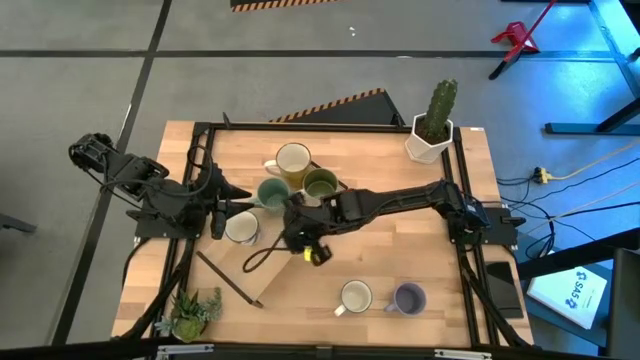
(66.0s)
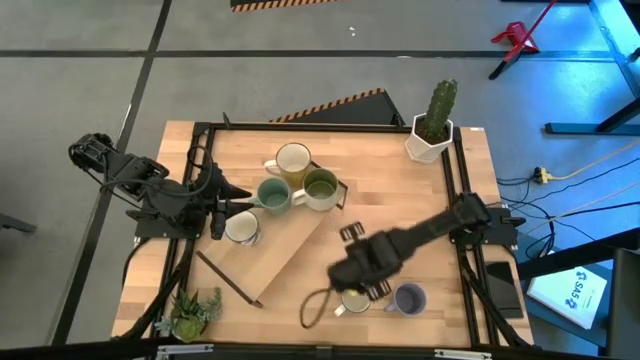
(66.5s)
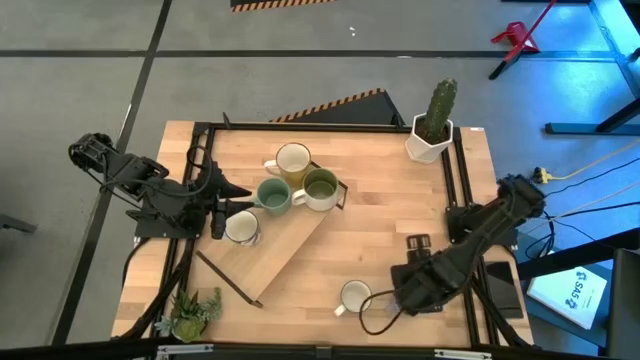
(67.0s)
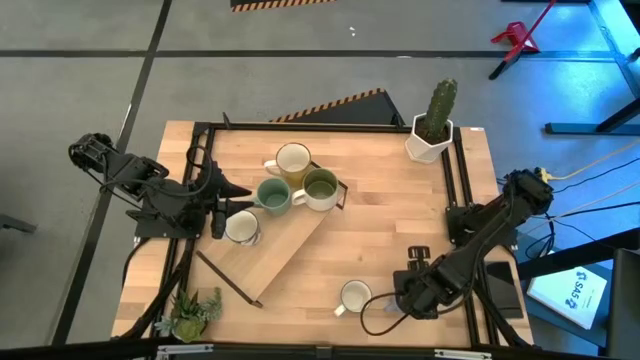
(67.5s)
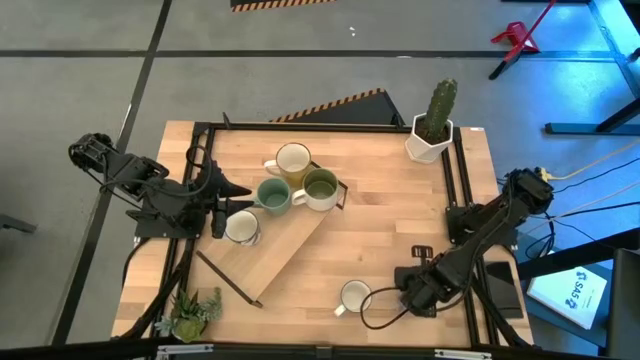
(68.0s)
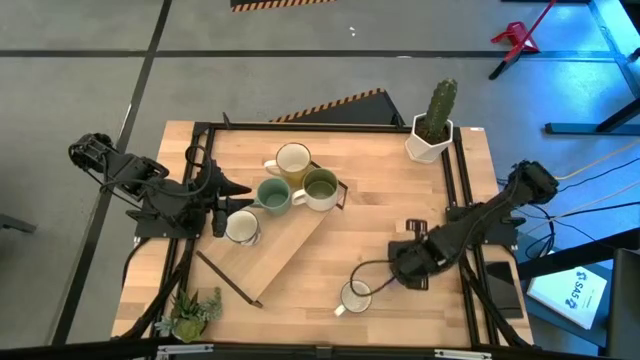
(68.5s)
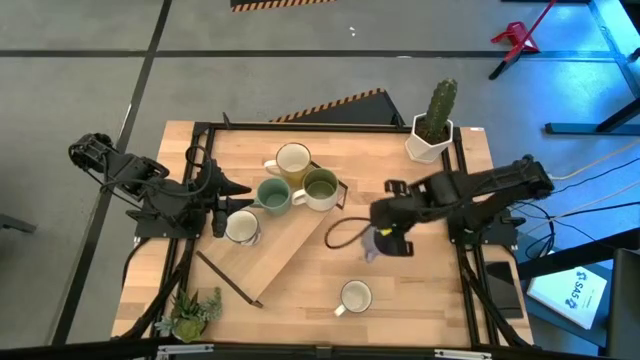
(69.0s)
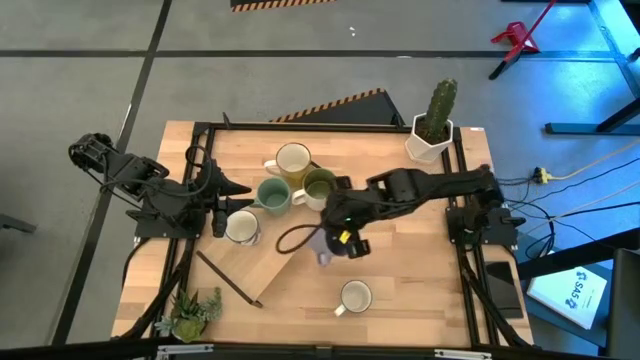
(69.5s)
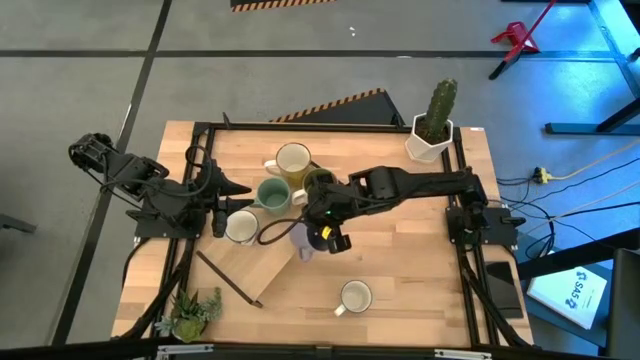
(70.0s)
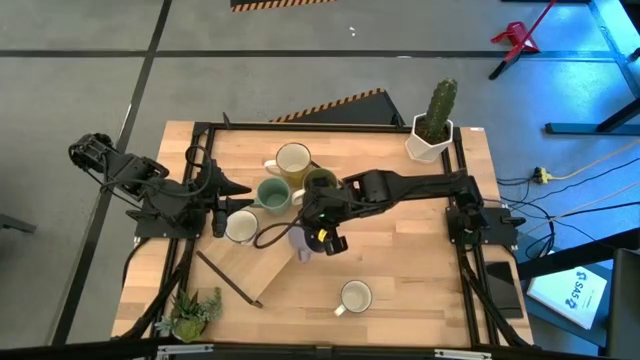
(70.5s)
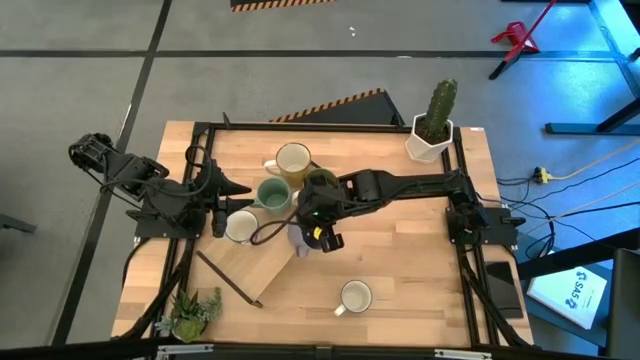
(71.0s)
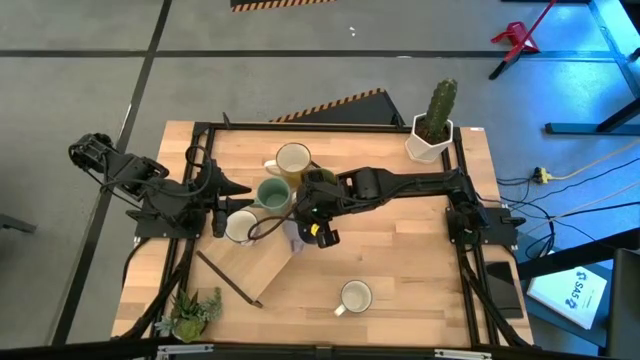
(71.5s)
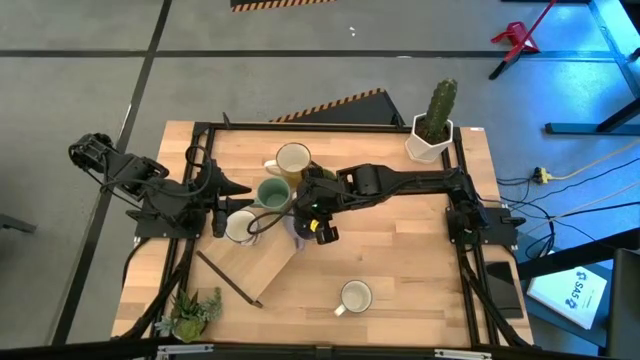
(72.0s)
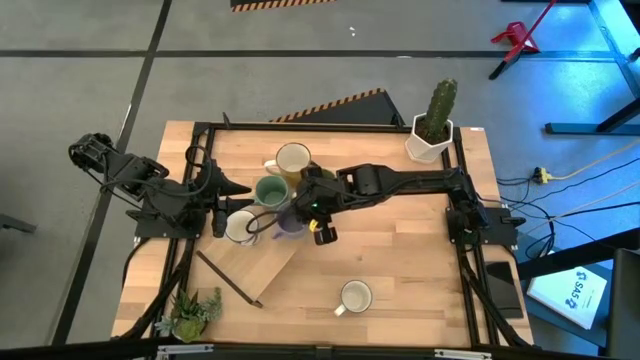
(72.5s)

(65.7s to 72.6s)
Task: Place coffee mugs
Put the purple mug on the shelf

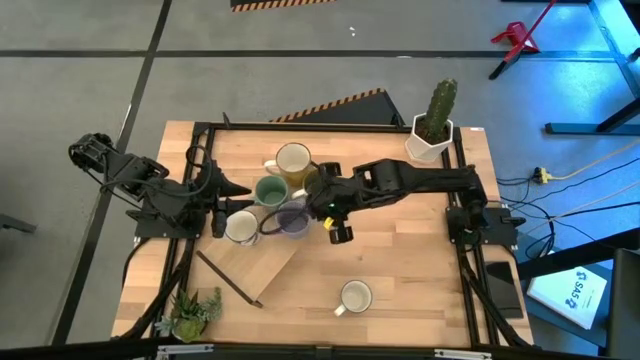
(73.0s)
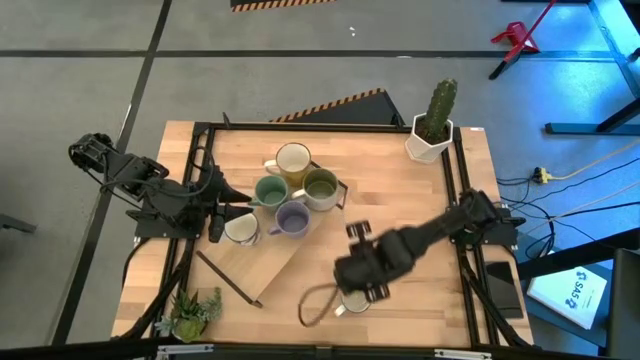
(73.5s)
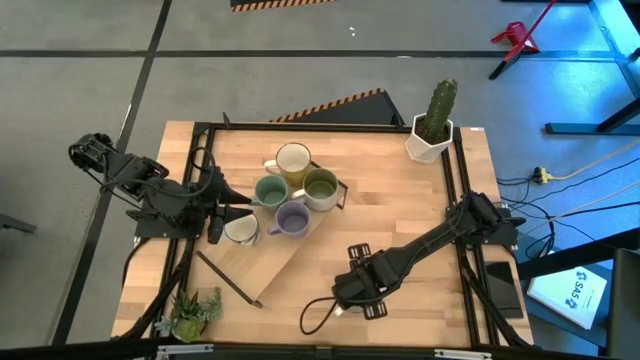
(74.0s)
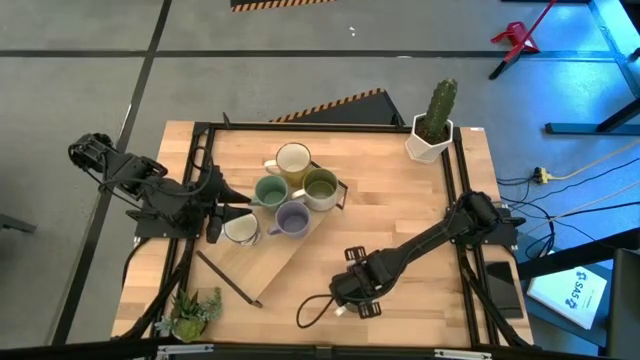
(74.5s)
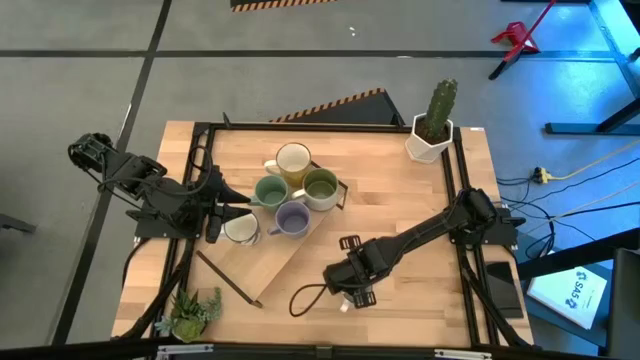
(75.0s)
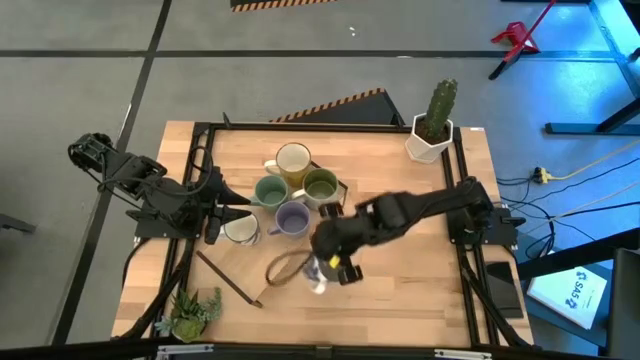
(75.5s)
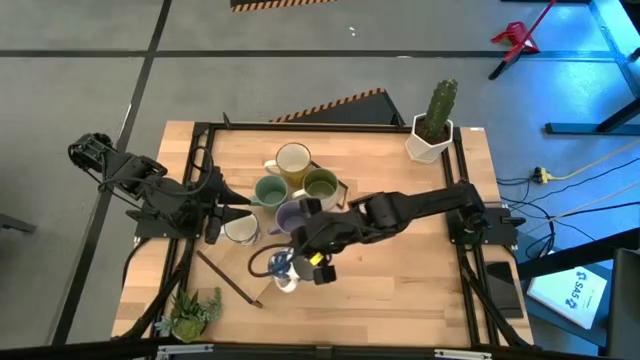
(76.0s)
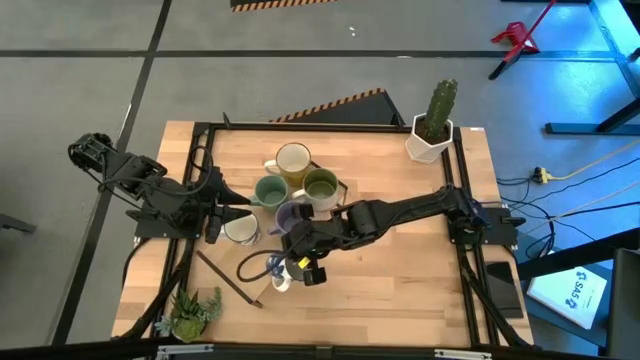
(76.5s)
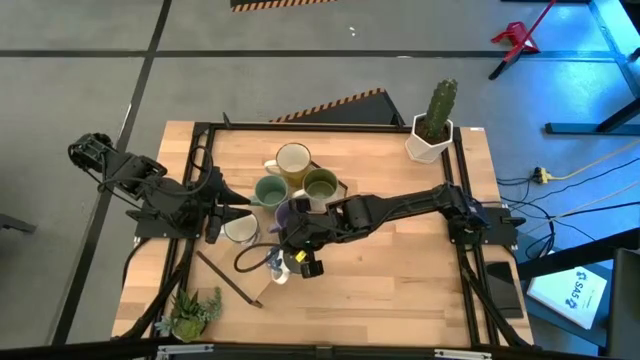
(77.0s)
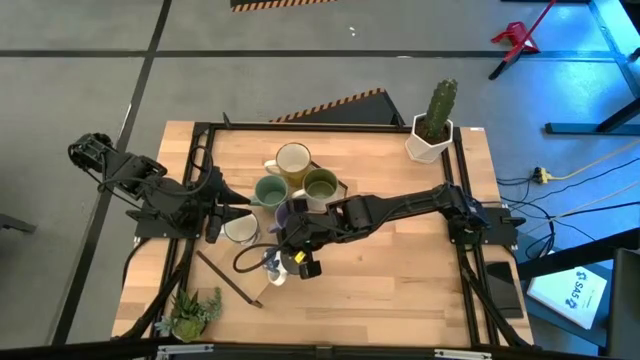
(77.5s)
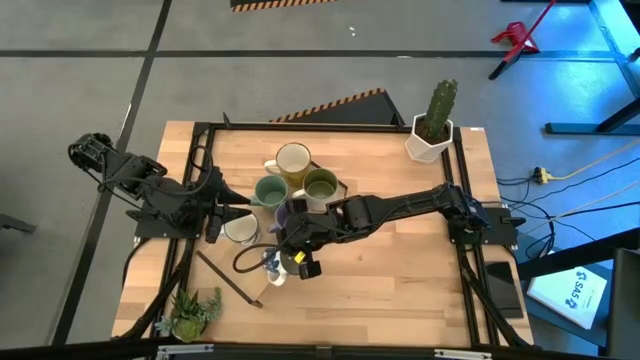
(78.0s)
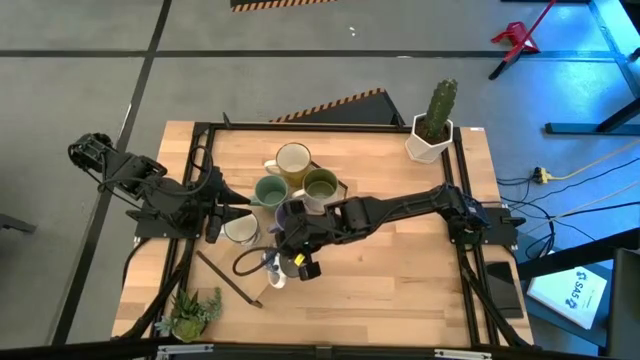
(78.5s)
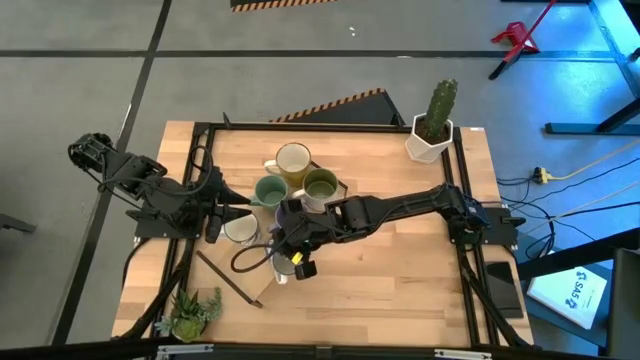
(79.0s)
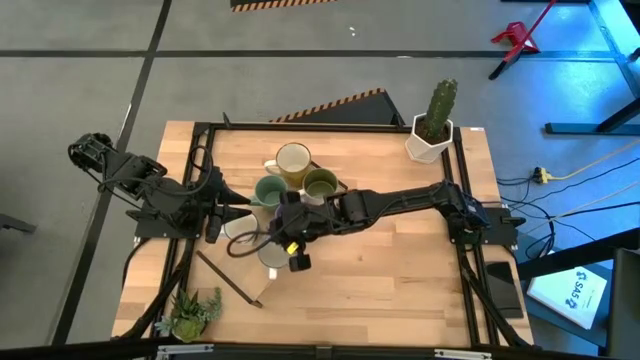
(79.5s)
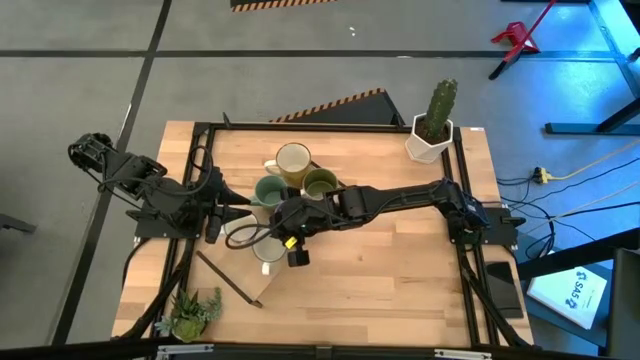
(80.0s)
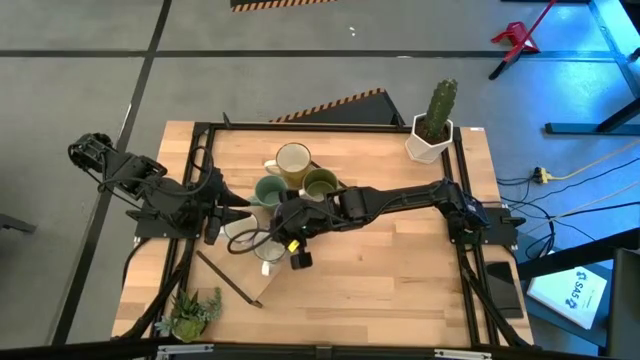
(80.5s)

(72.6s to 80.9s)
Put the flowered mug on the shelf

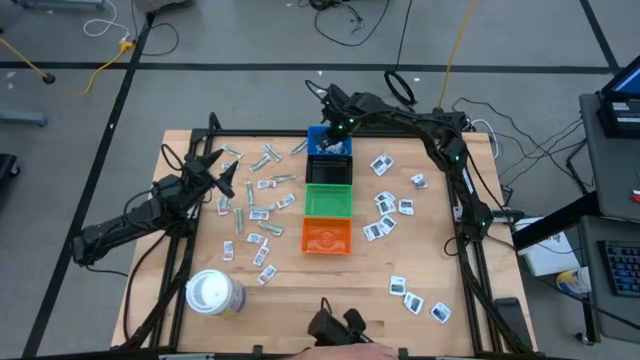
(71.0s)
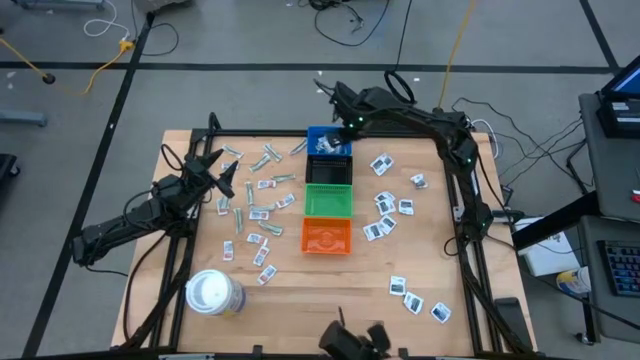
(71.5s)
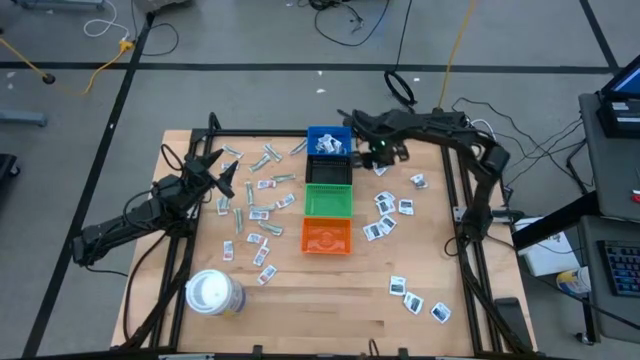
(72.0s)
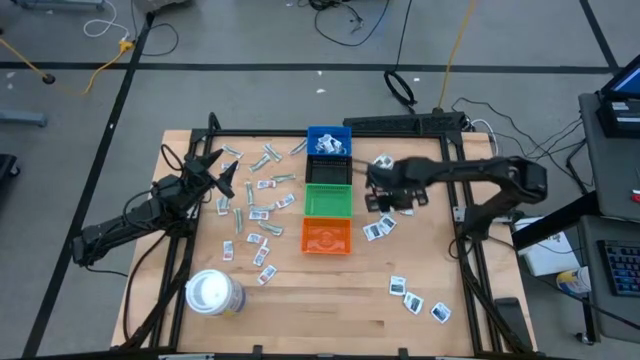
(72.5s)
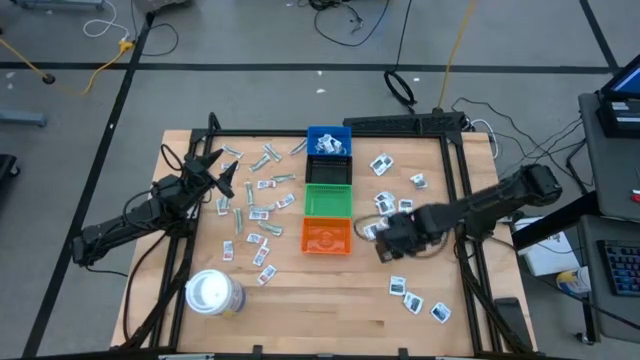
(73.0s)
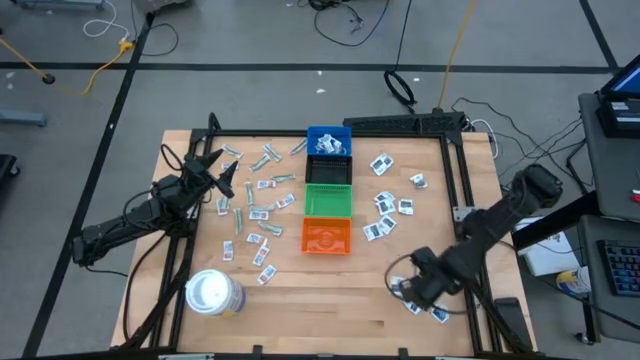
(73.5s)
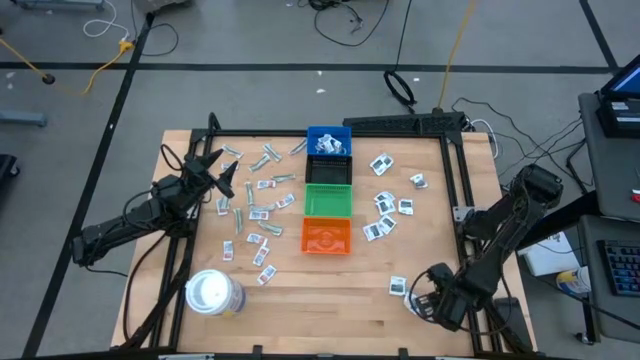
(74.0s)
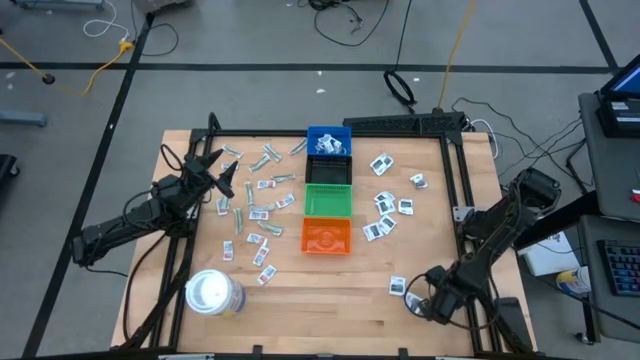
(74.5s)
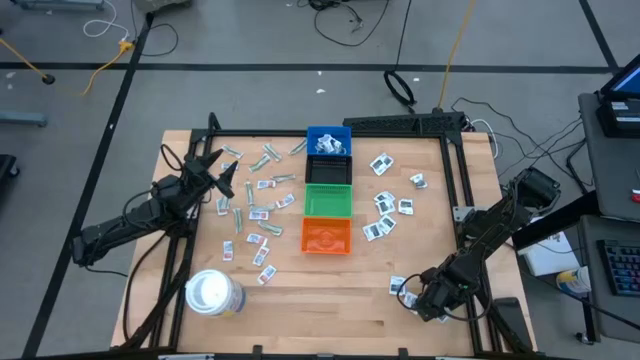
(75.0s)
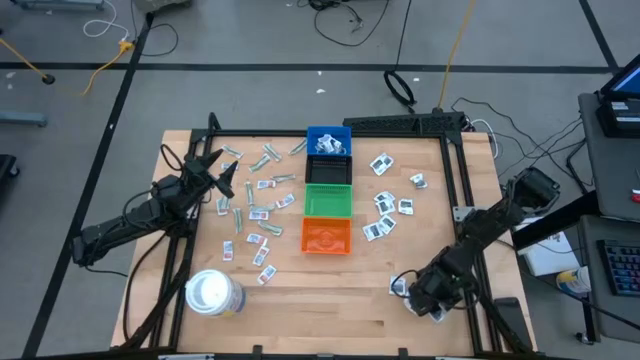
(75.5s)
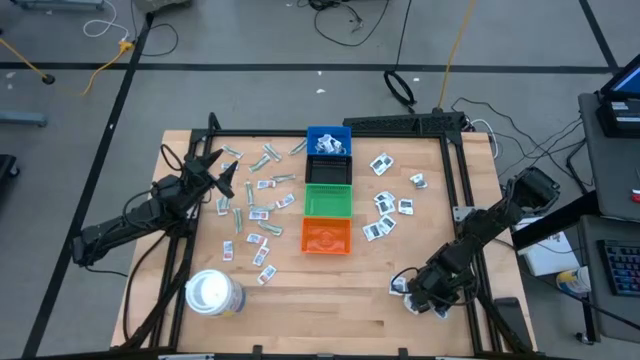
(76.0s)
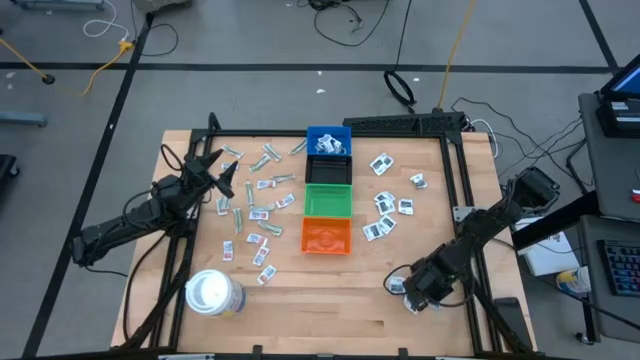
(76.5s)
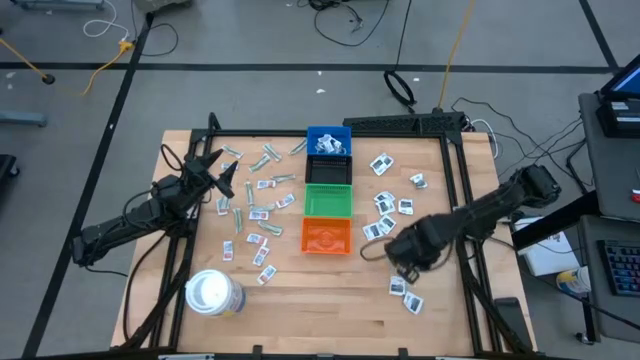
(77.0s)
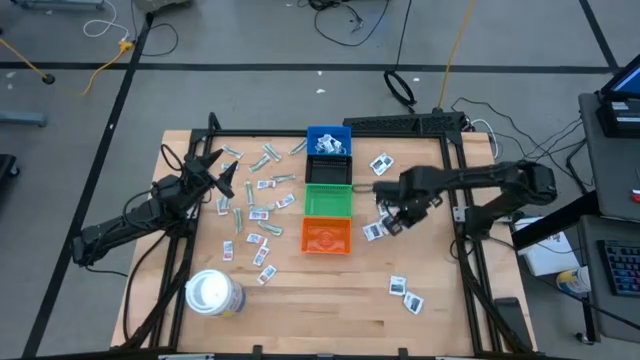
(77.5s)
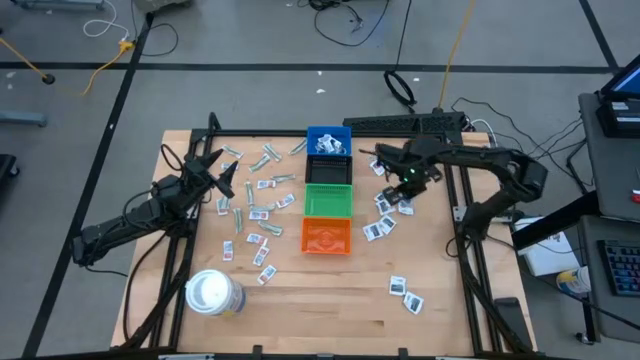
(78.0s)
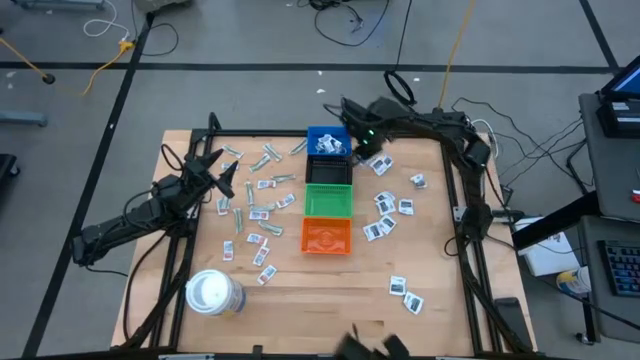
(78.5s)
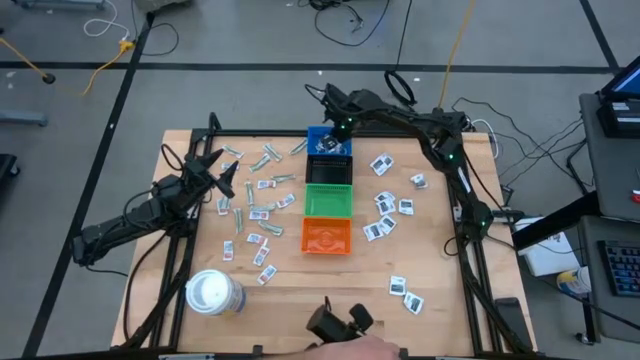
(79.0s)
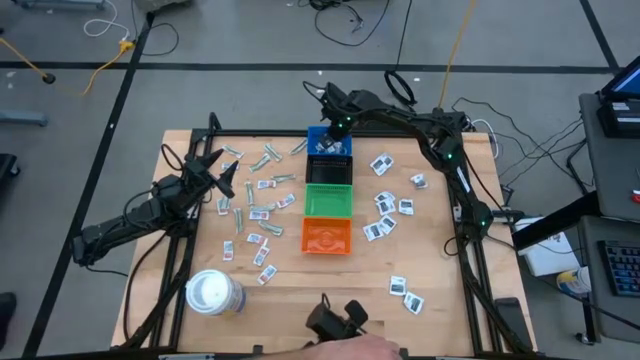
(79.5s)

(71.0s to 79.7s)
Task: Pick & Place First Aid Supplies
Put the blue alcohol pad into the blue bin
